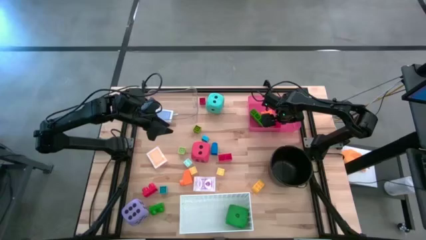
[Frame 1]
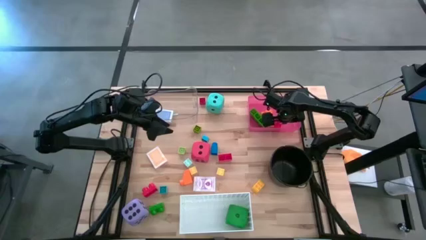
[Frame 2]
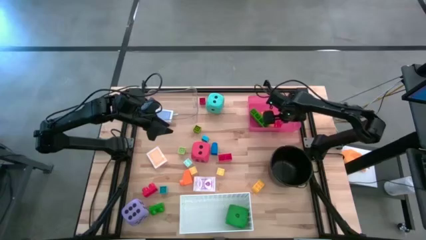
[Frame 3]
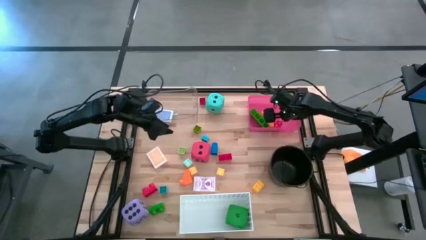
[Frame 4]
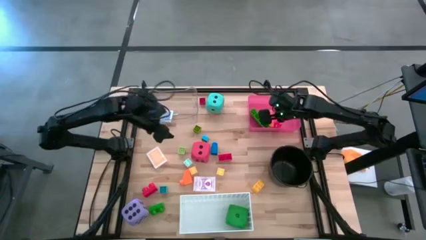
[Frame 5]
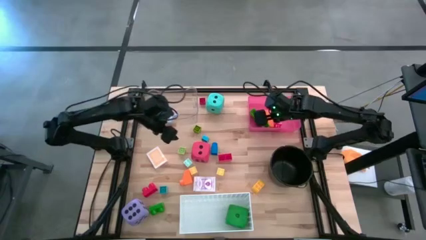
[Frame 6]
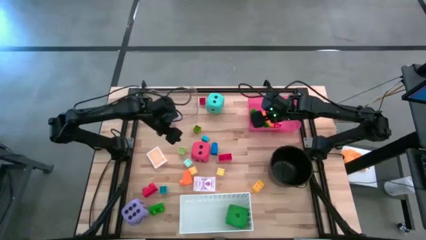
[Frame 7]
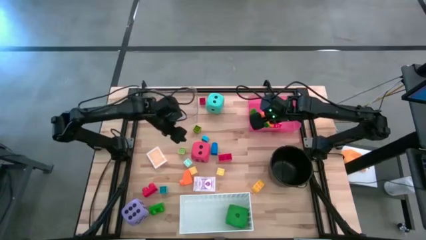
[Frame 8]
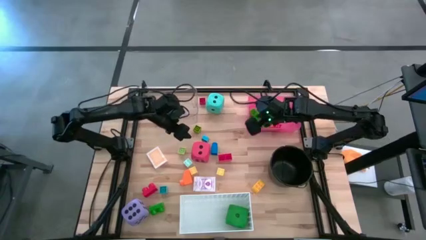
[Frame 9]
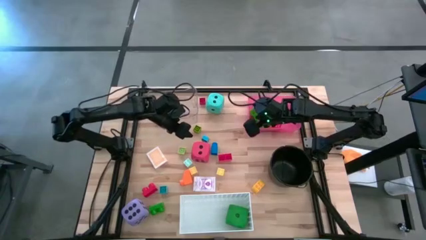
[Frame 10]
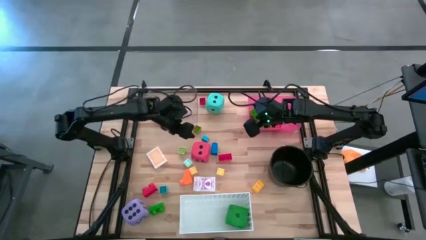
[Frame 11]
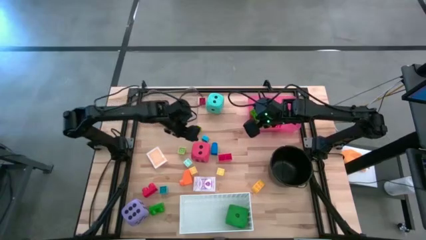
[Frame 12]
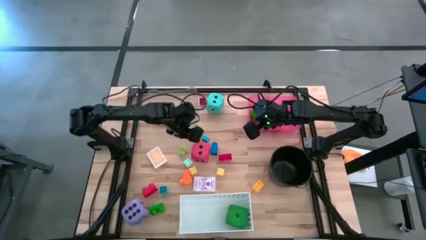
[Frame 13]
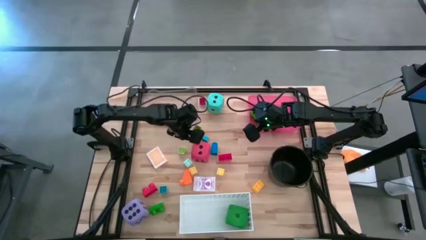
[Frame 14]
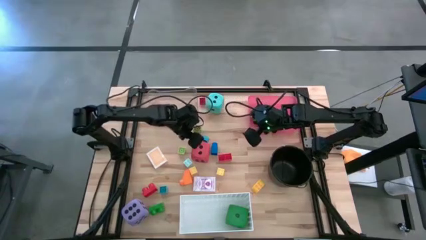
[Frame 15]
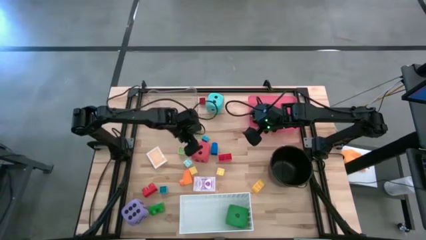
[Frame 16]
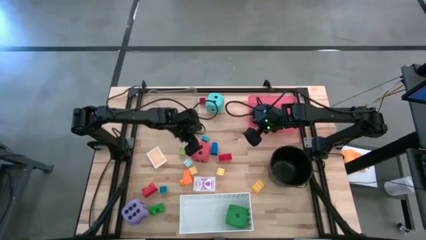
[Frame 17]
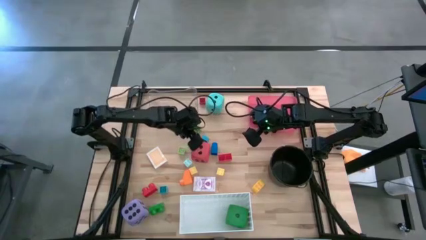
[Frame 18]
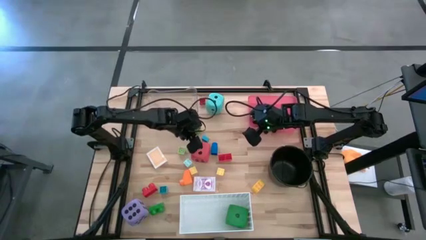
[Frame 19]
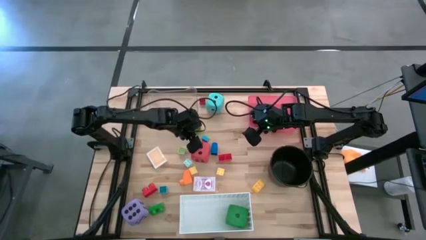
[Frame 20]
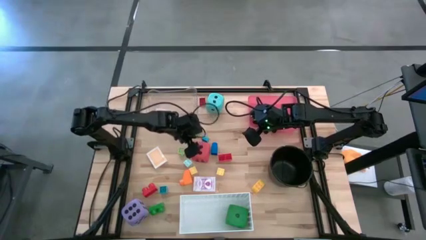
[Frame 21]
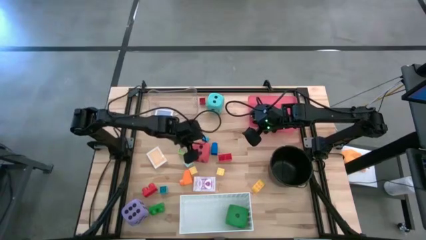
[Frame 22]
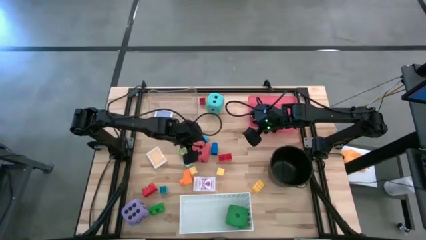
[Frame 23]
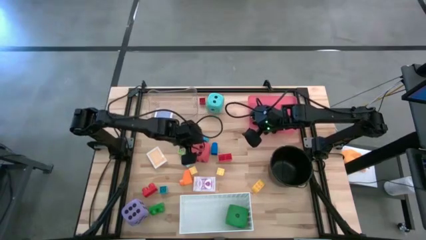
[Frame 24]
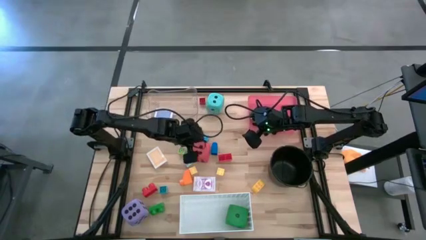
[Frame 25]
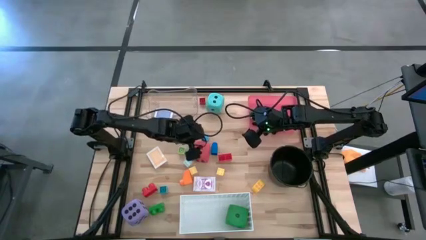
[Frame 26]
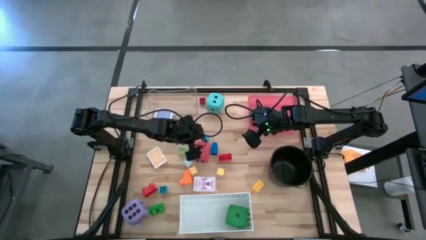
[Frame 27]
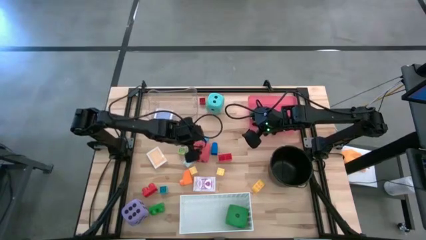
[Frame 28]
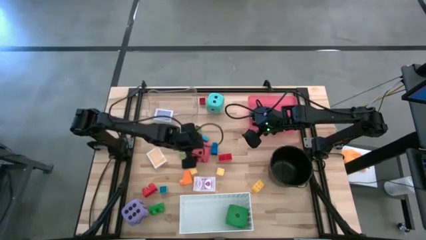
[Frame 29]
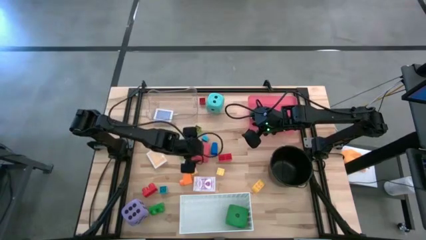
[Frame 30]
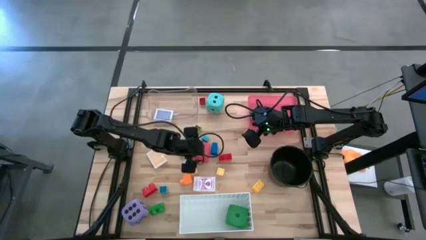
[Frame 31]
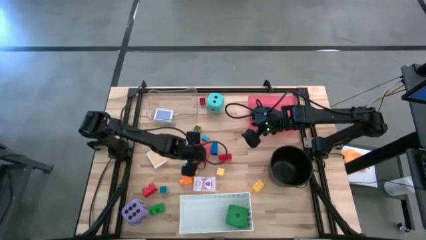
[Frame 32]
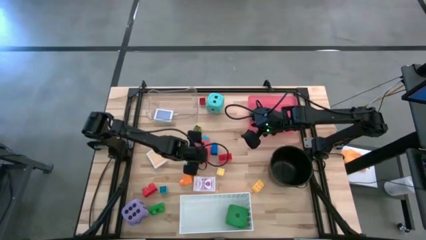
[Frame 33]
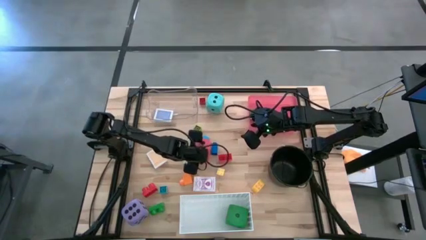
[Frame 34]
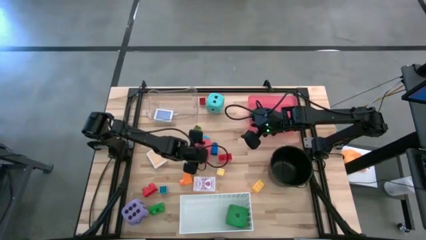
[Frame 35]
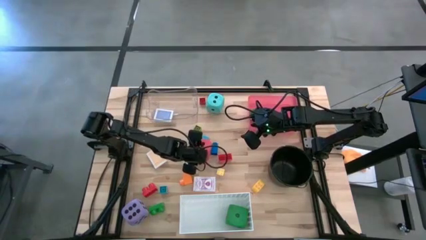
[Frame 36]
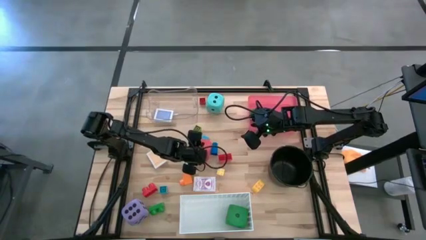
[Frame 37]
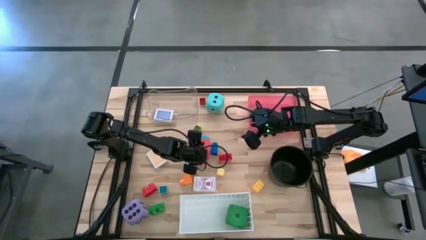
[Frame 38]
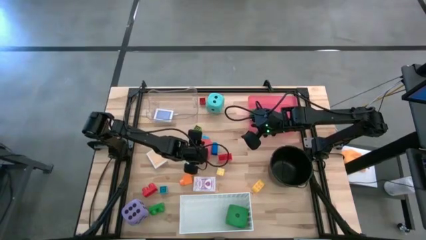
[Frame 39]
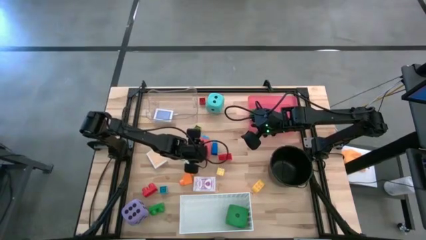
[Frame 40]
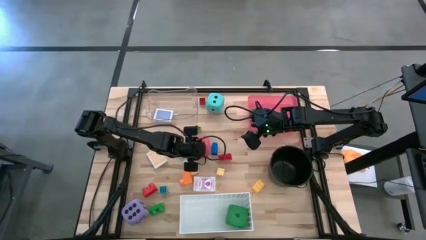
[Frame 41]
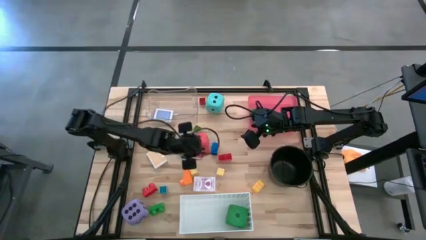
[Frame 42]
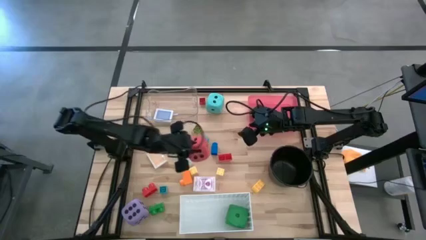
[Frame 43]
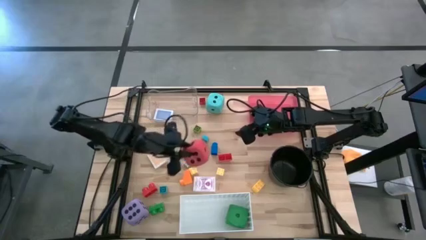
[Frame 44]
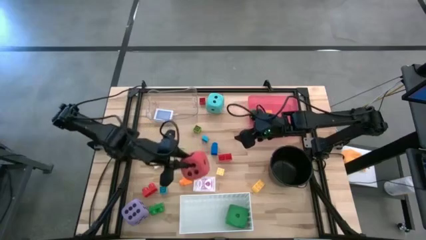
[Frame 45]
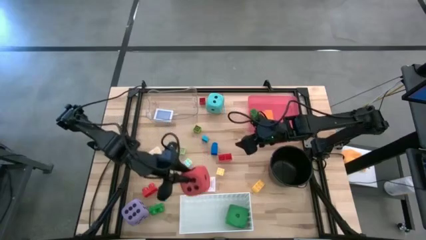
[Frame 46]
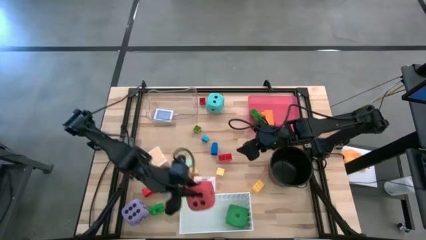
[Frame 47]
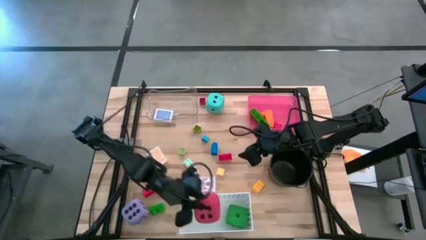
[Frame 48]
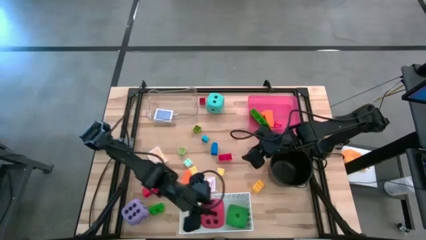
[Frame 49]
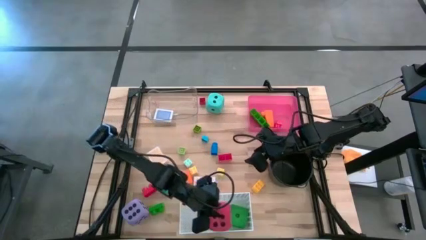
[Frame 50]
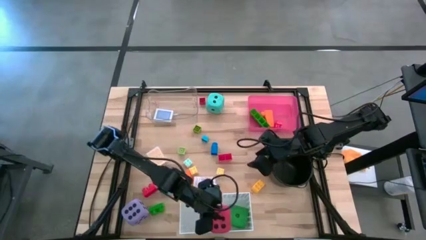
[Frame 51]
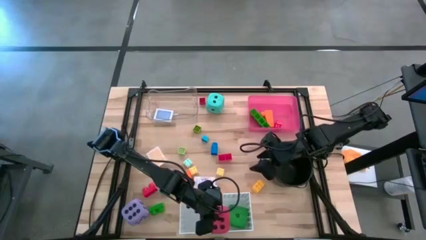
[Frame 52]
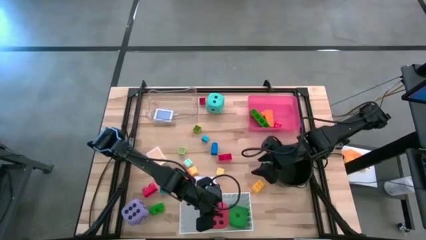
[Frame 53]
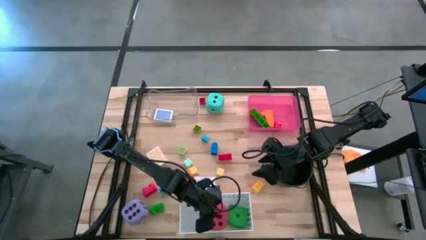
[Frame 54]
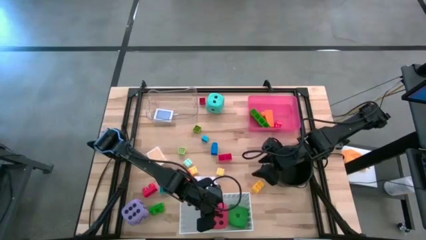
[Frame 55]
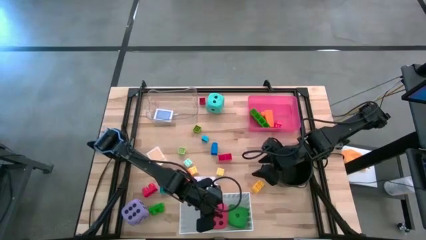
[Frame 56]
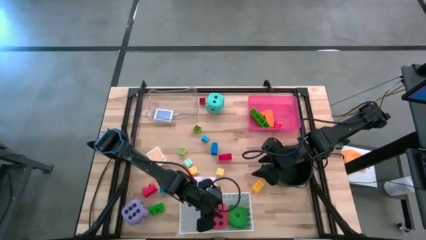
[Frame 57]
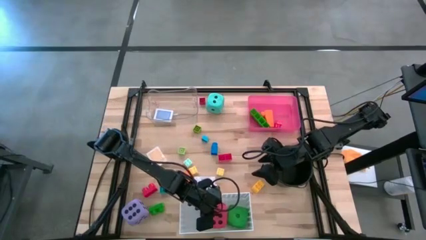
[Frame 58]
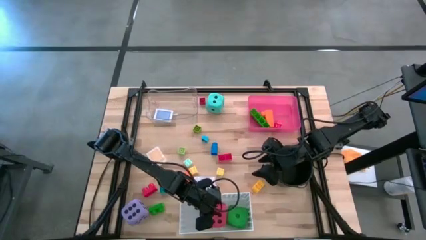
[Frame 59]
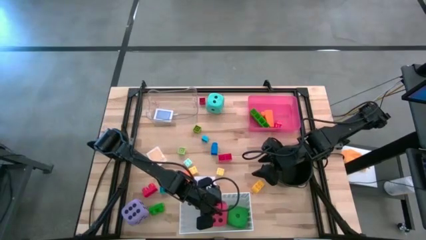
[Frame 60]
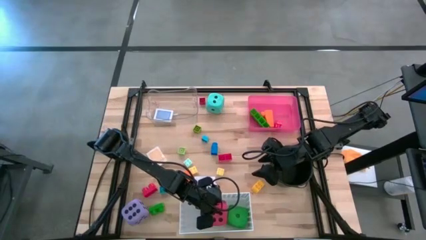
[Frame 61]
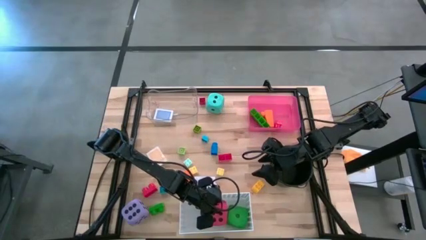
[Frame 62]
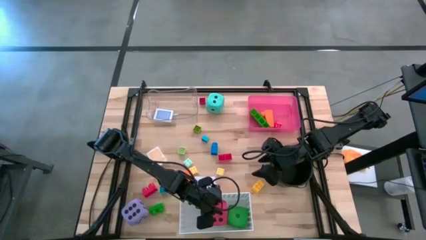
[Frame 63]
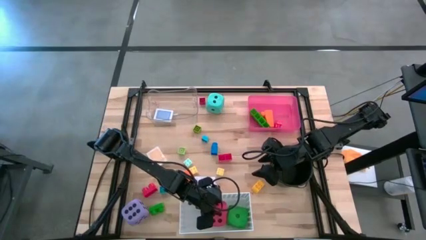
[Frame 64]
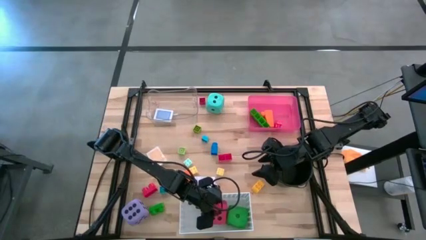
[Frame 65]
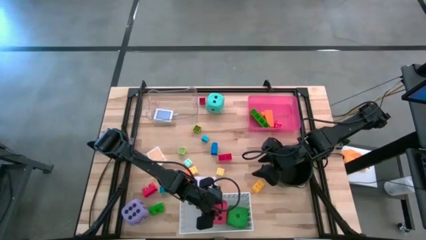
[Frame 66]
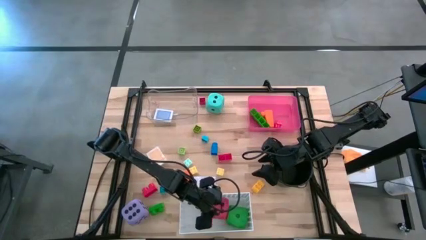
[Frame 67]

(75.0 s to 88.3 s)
Task: Pick & Place Toys
Put the red dice into the white bin

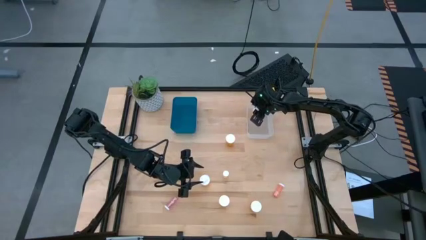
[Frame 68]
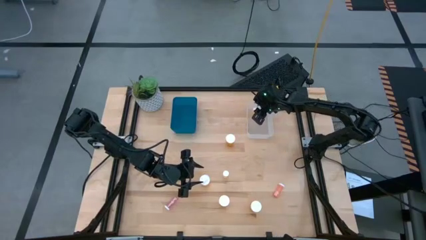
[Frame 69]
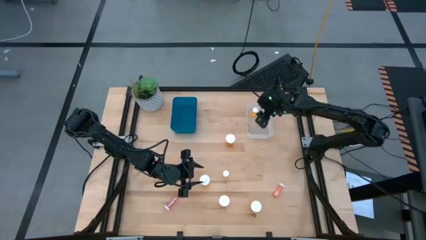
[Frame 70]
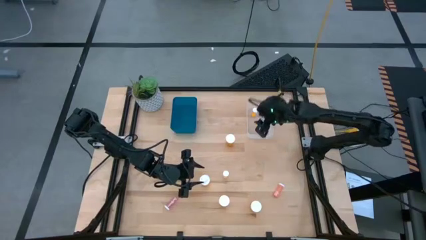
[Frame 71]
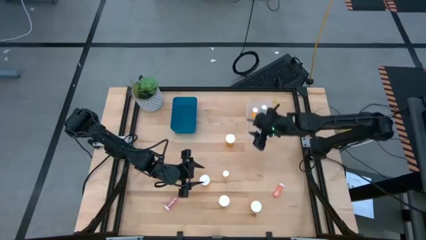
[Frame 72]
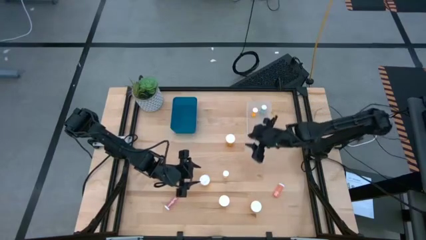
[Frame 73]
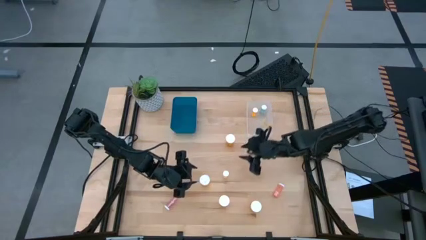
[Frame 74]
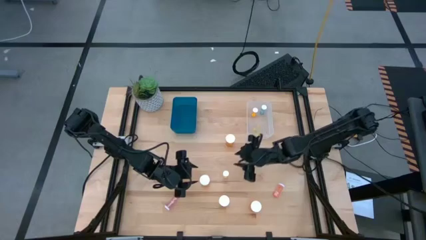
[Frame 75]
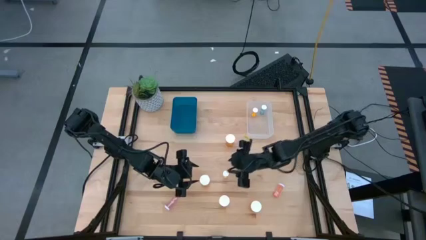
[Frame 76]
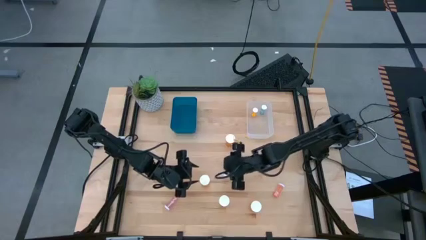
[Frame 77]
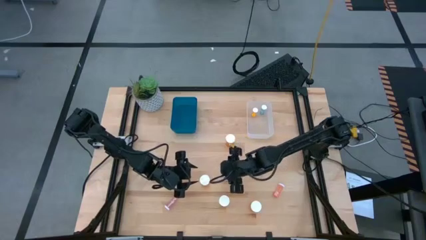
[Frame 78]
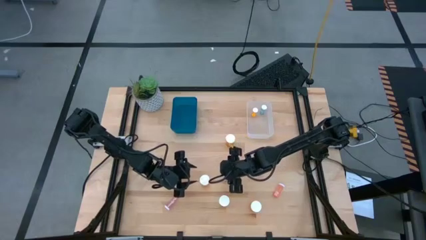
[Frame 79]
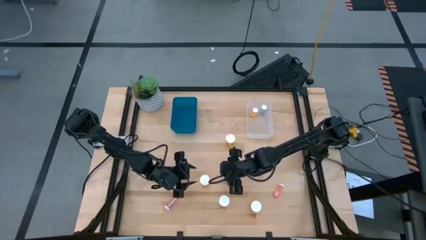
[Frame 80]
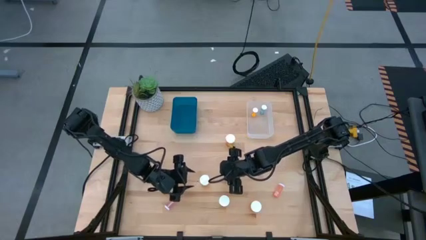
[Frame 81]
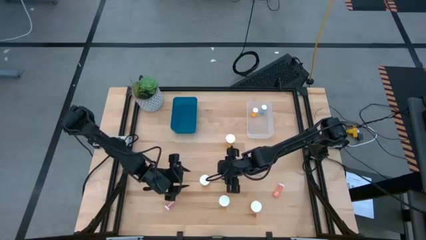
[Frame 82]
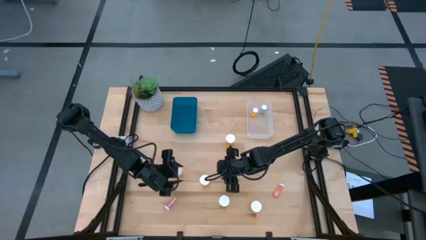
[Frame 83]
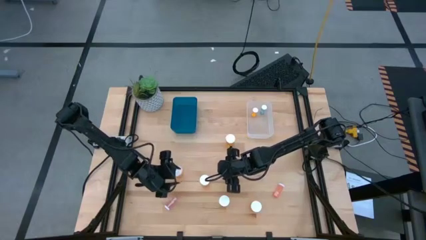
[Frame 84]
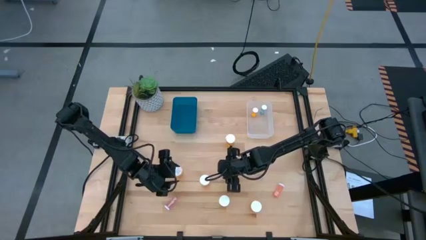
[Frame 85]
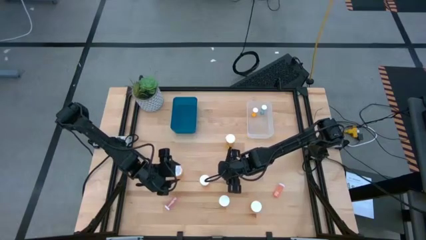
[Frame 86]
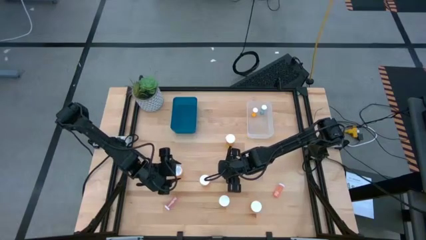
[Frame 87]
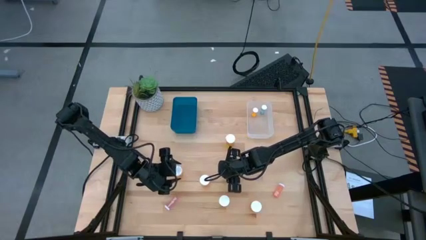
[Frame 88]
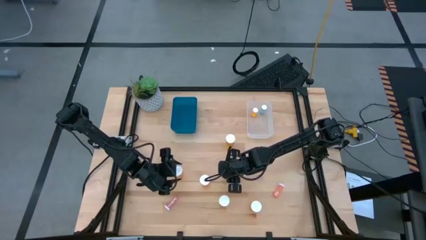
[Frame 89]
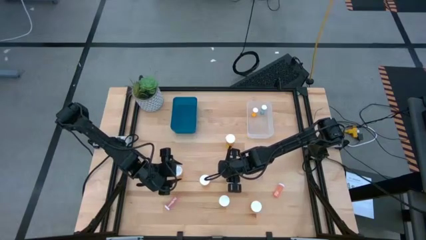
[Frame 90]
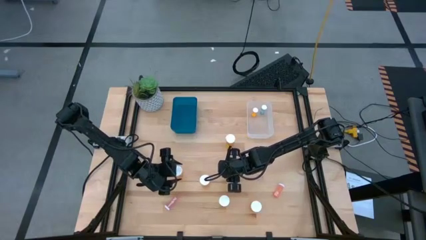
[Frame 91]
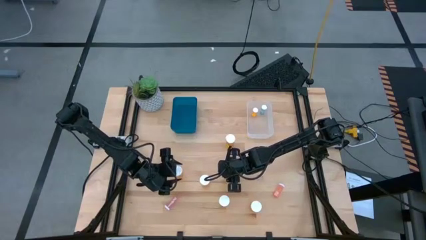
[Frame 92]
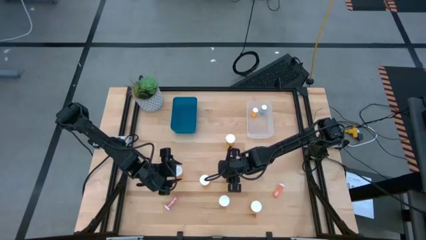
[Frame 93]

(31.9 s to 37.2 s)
Task: Pick and place medicine bottles into bin by pill shape (circle, oval)
Put the small yellow pill bottle into the transparent bin
